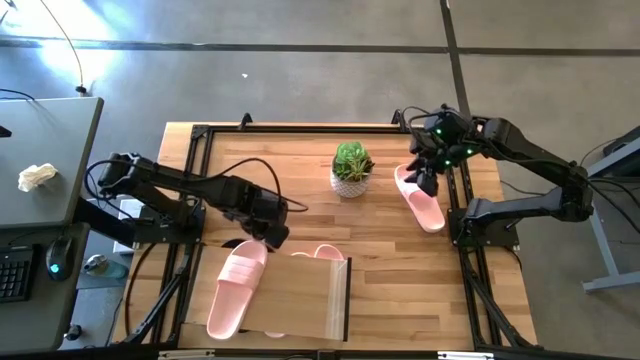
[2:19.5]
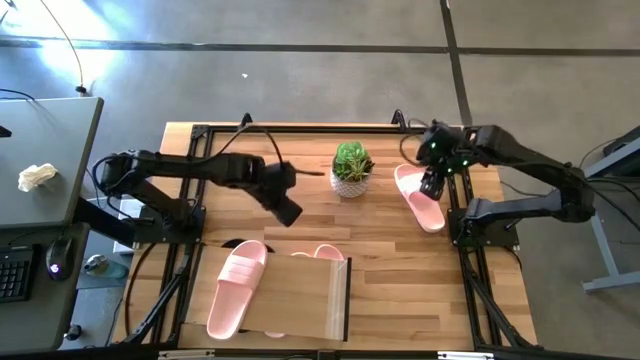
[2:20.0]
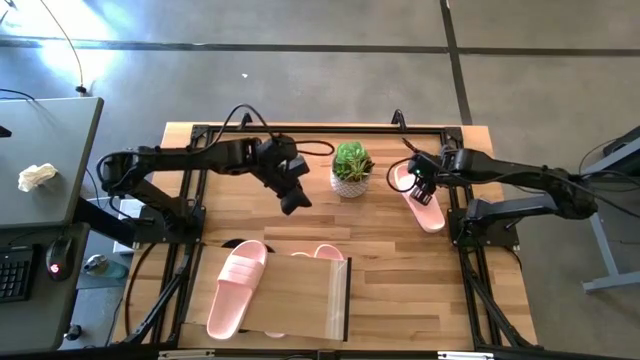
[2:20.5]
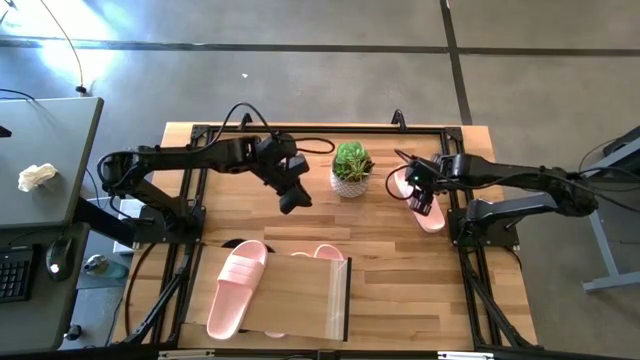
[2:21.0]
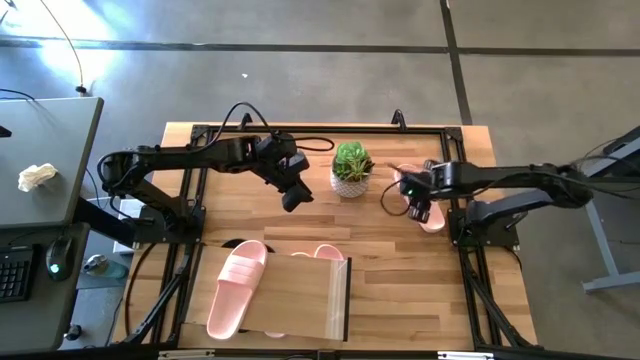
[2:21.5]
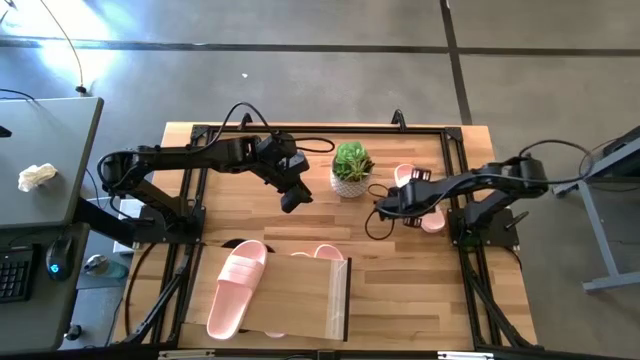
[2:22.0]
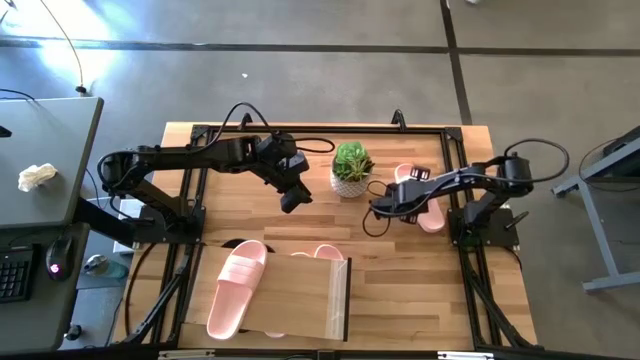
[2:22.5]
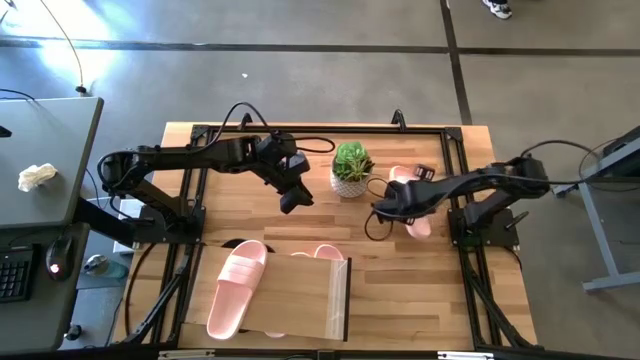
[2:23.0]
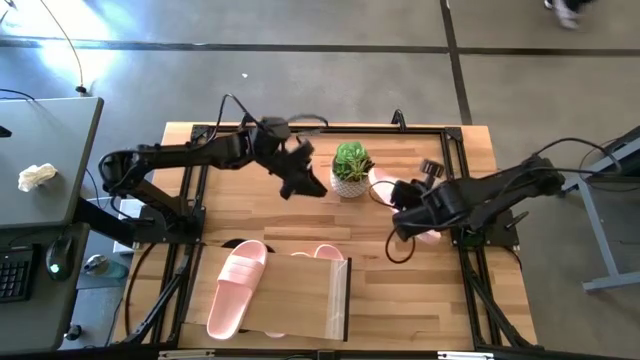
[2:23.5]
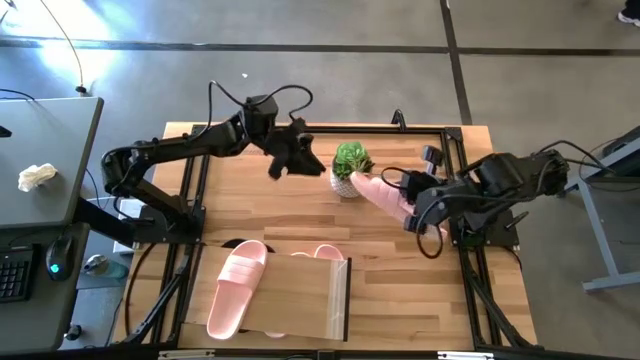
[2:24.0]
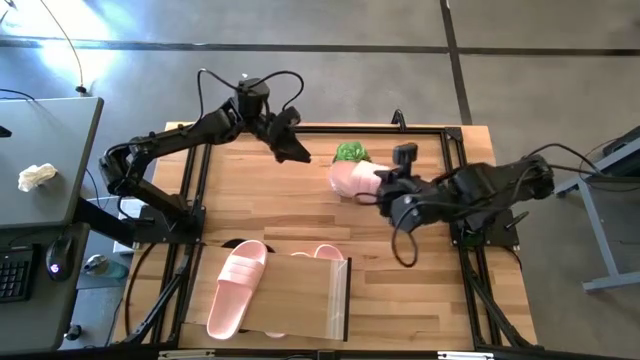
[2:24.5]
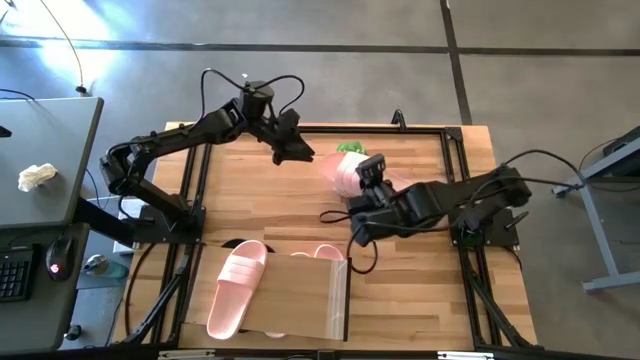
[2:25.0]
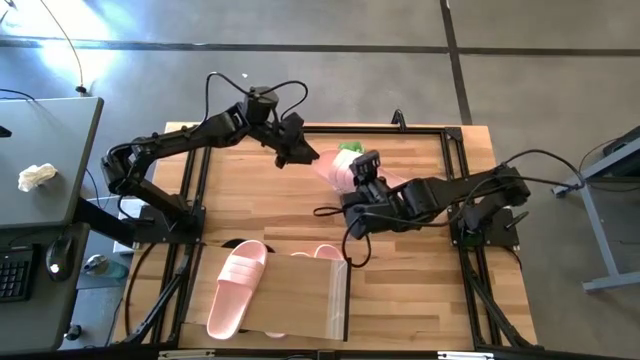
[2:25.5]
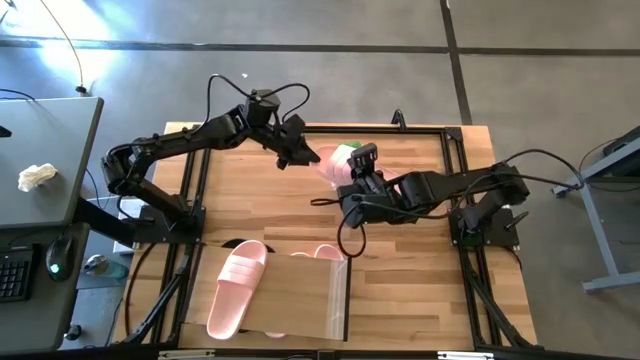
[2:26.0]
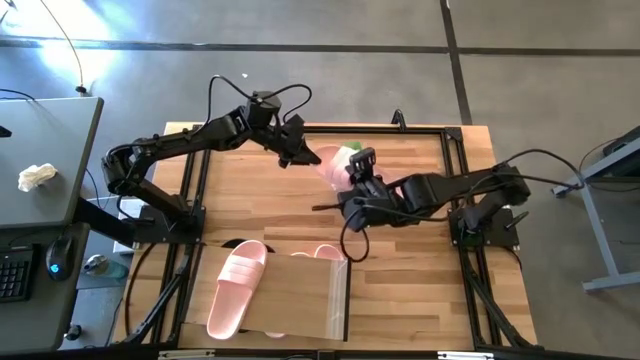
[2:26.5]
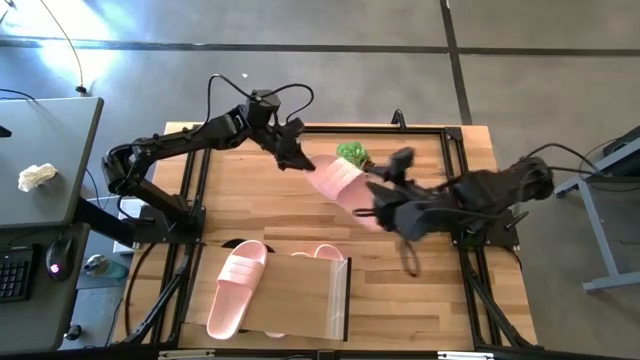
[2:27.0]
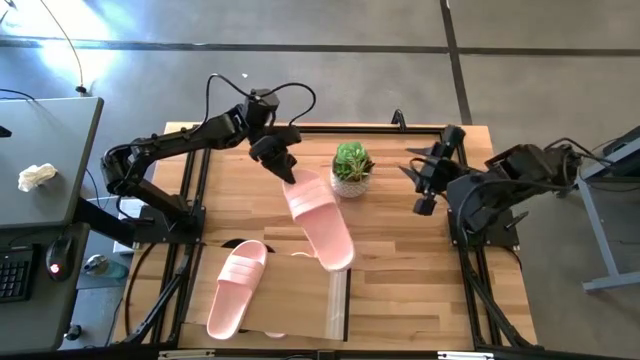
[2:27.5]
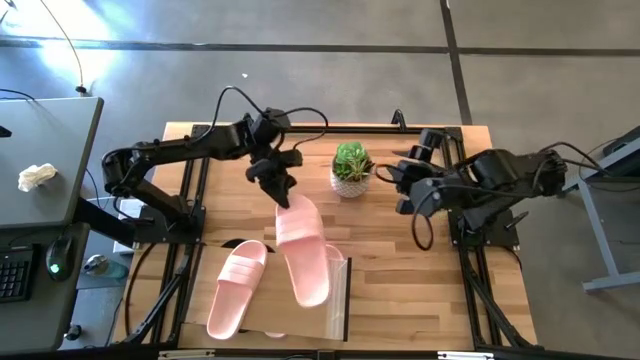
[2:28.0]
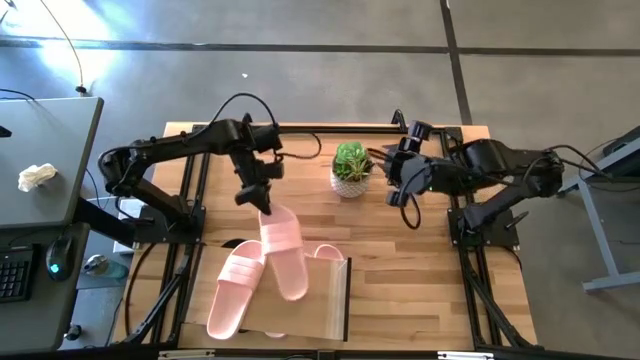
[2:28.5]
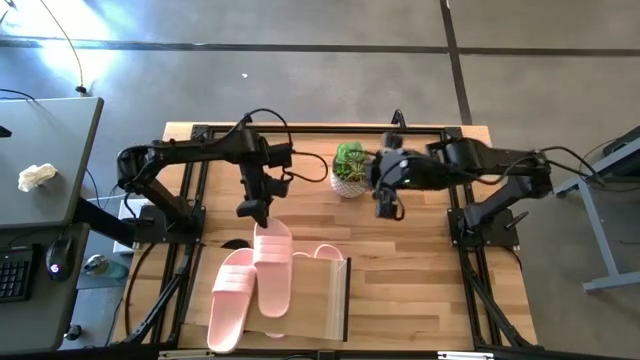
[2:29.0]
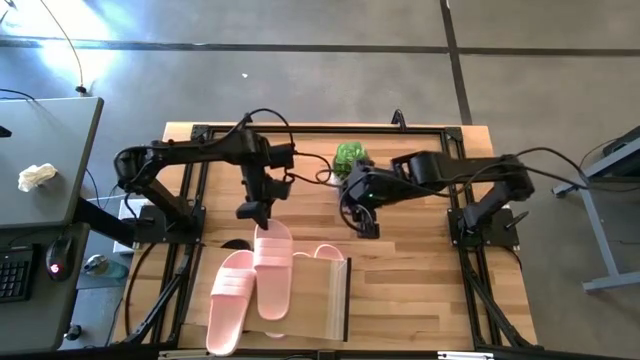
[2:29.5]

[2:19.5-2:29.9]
Task: Pick and place slides into the shelf
Put the pink slide on the shelf

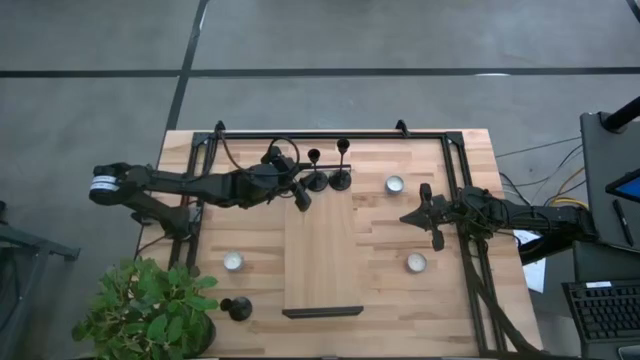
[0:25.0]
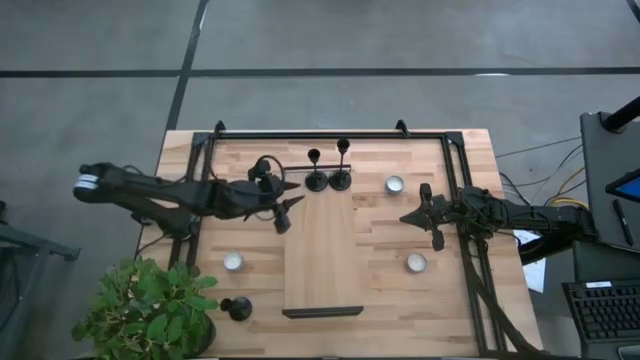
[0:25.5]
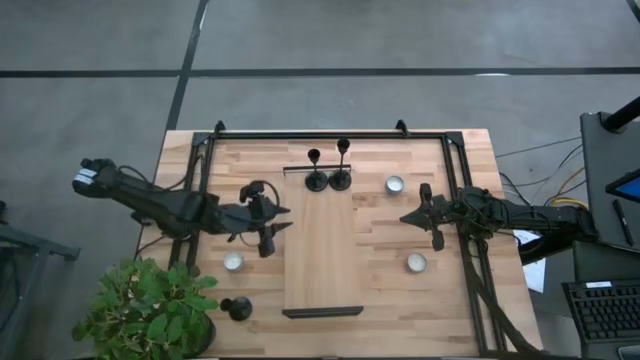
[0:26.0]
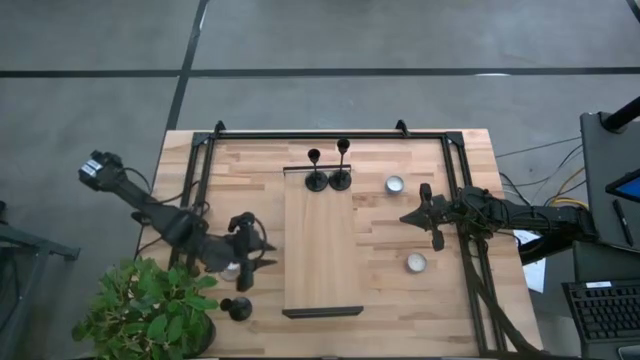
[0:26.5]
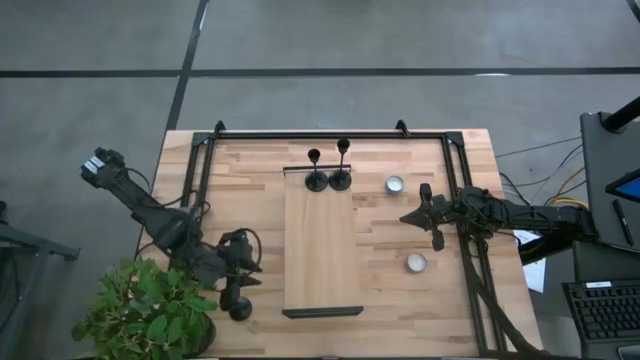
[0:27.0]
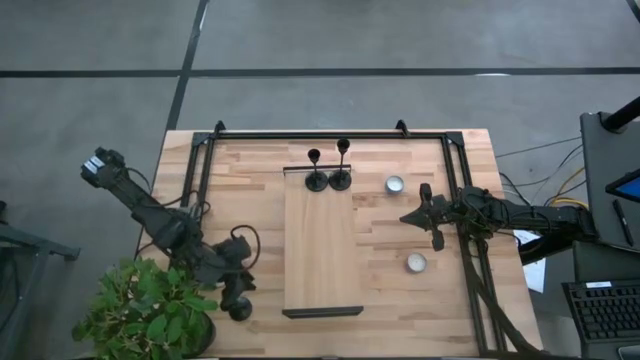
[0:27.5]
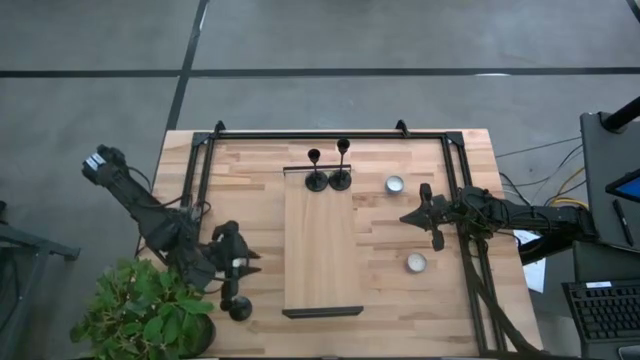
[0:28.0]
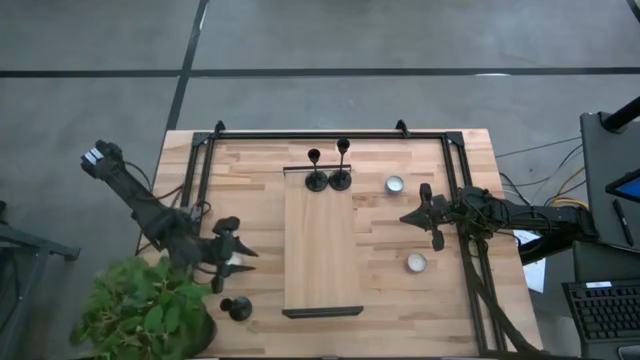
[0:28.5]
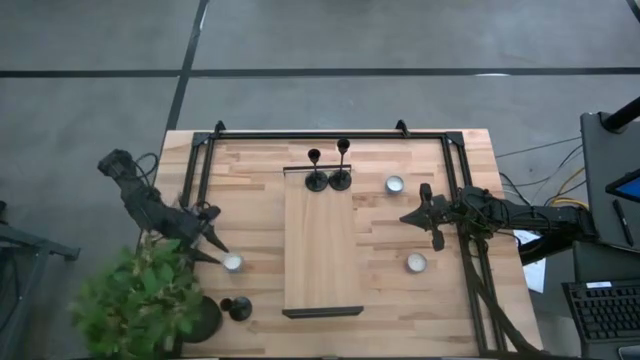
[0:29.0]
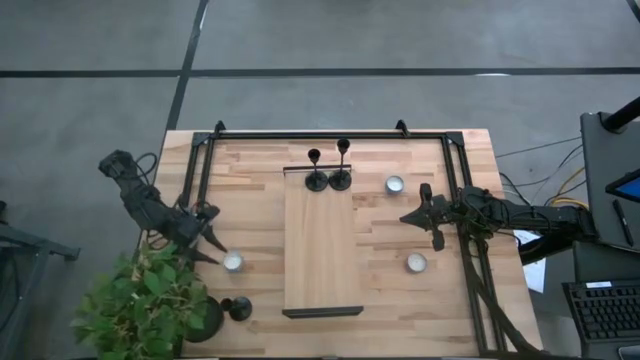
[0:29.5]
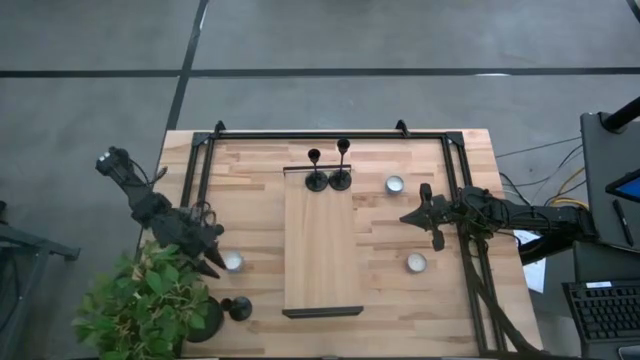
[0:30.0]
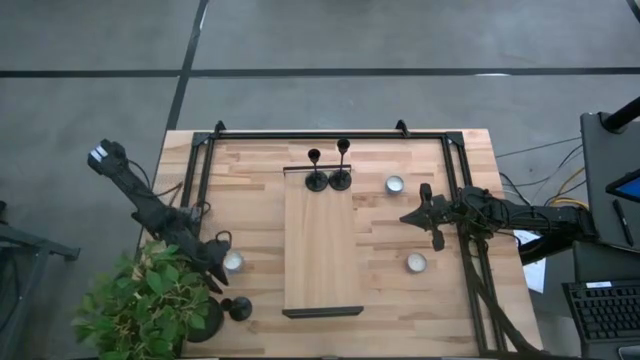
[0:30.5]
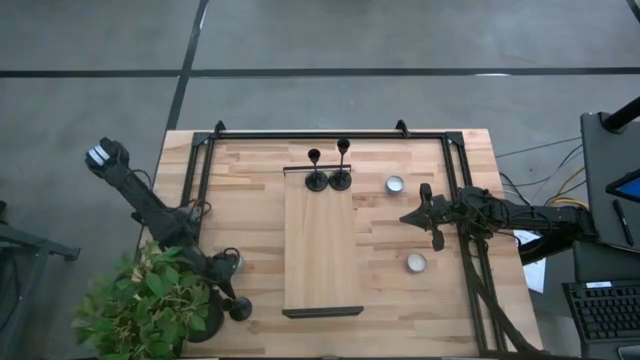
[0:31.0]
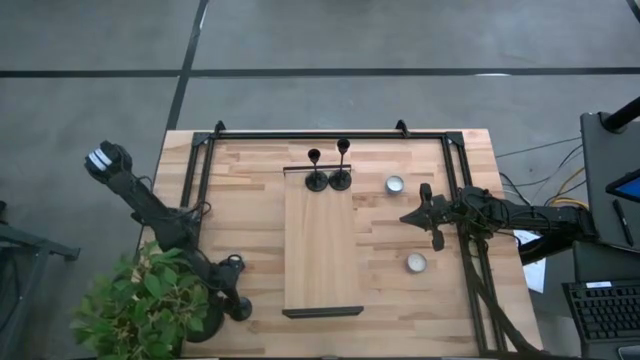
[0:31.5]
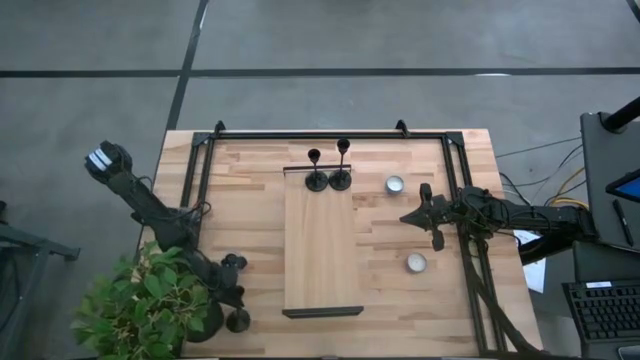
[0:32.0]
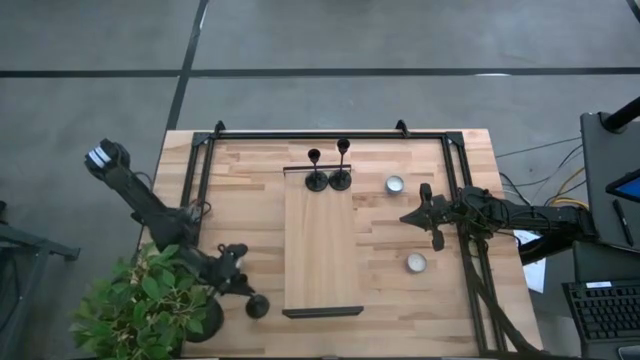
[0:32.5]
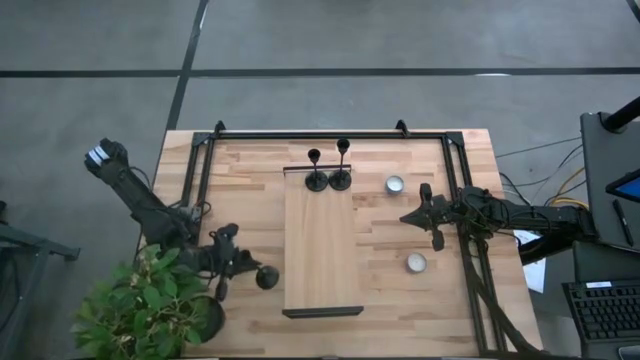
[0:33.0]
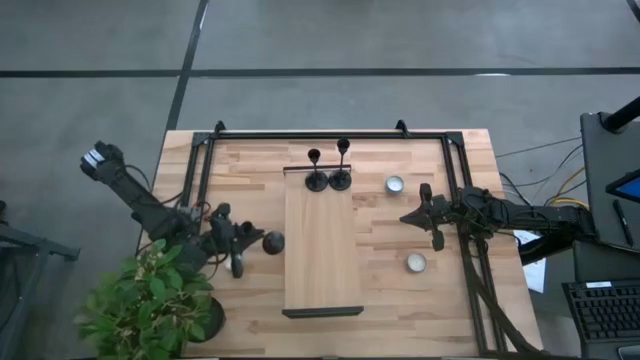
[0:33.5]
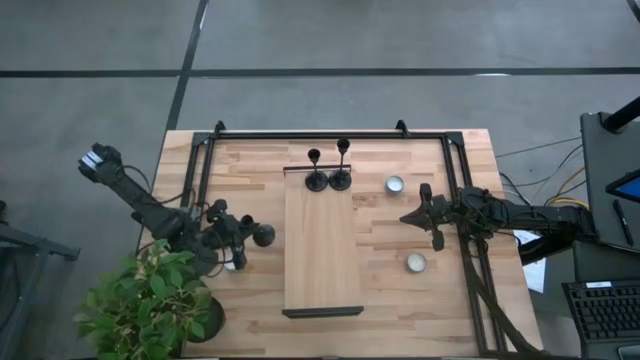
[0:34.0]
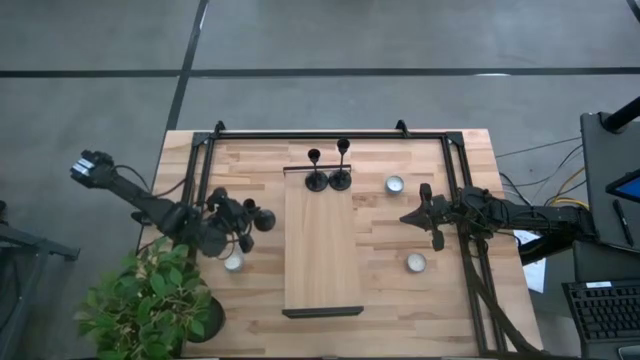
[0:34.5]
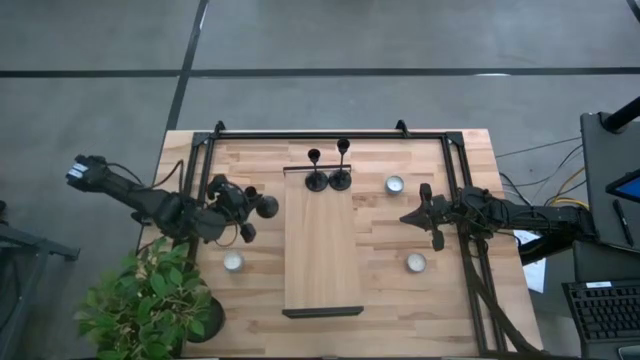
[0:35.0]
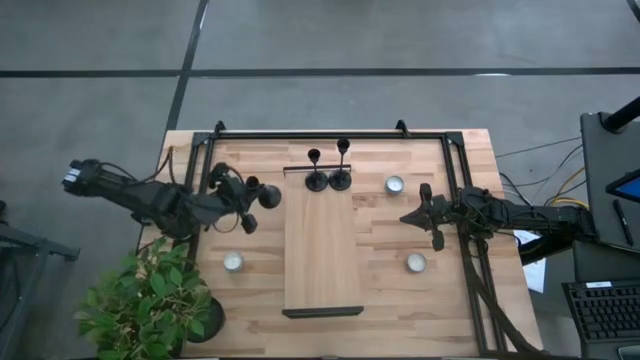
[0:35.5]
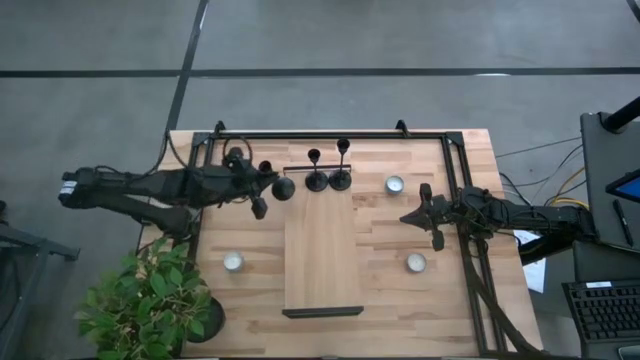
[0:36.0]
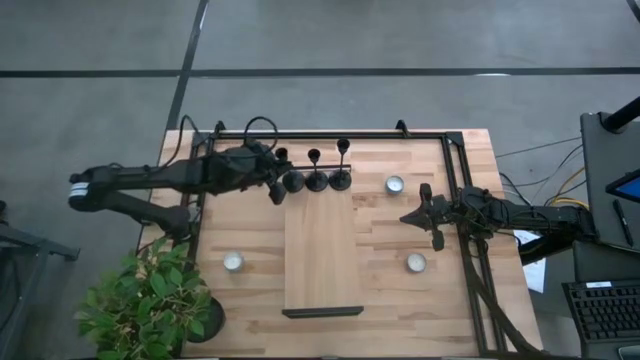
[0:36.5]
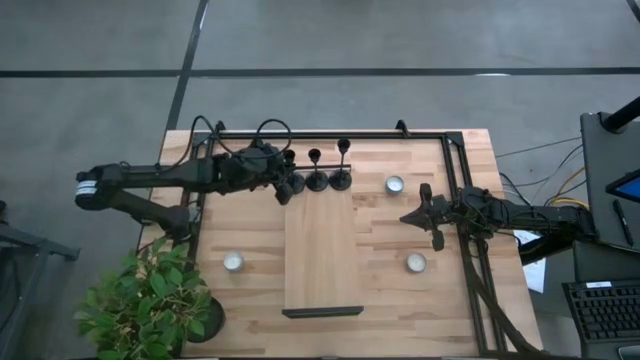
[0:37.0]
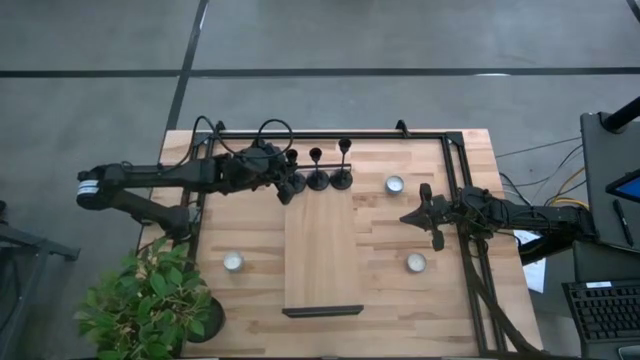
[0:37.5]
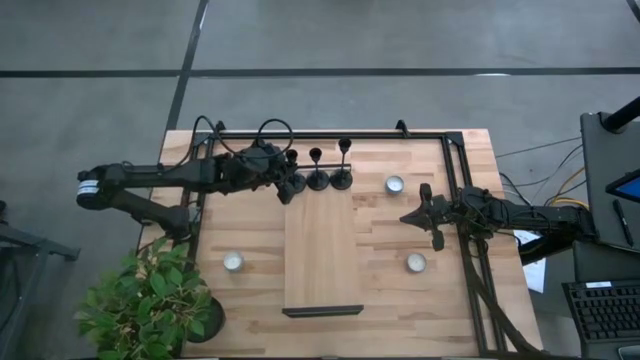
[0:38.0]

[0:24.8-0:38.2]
Task: Pick & Place candle stick holders
Put the black candle holder on the shelf aligned with the other black candle holders
